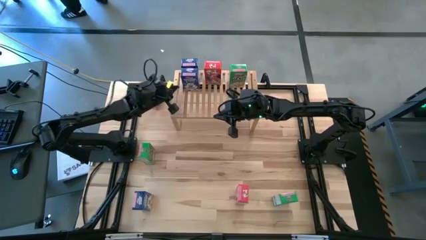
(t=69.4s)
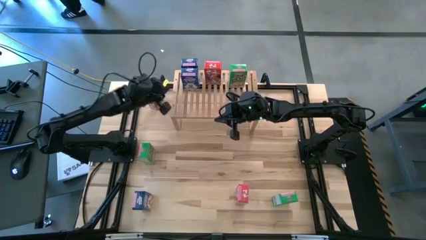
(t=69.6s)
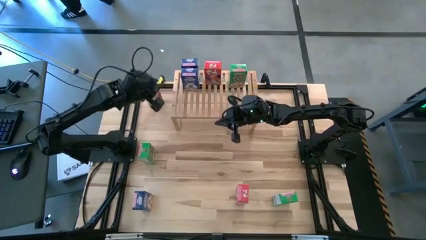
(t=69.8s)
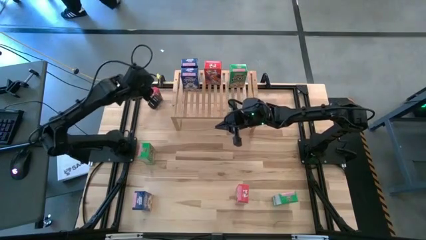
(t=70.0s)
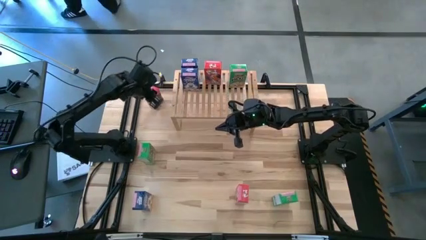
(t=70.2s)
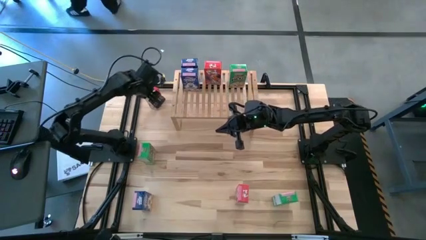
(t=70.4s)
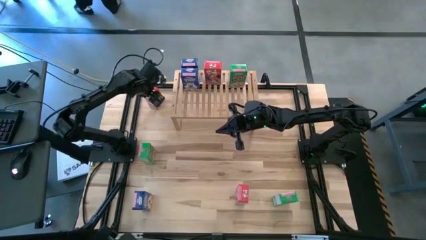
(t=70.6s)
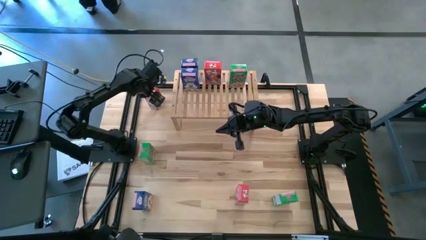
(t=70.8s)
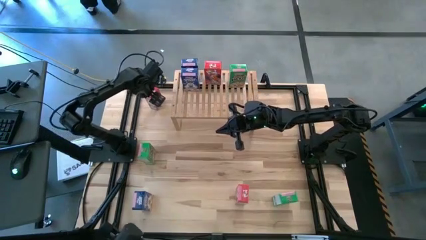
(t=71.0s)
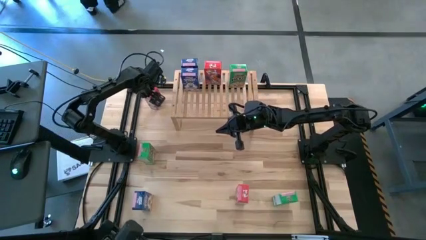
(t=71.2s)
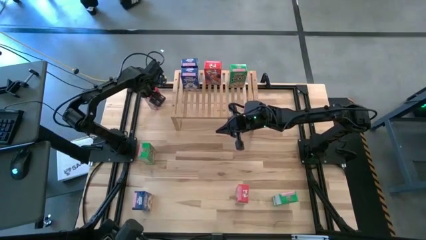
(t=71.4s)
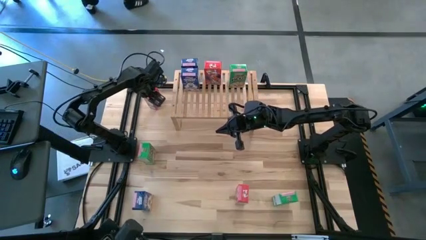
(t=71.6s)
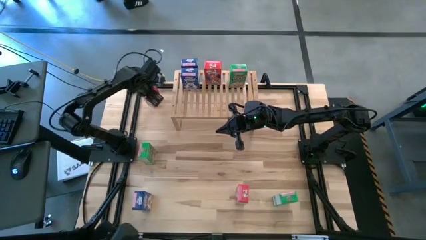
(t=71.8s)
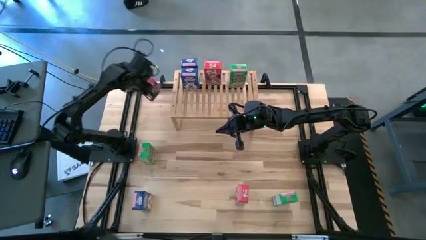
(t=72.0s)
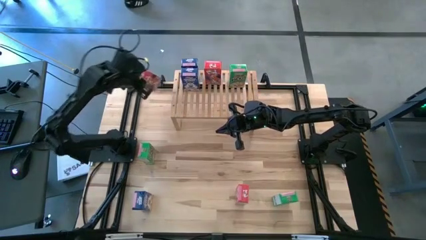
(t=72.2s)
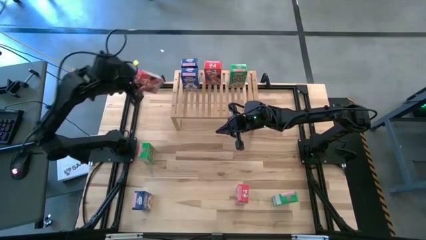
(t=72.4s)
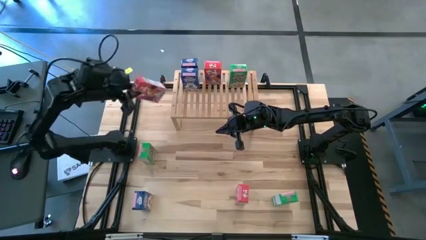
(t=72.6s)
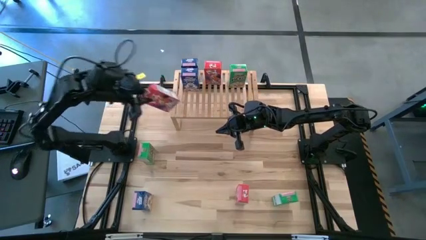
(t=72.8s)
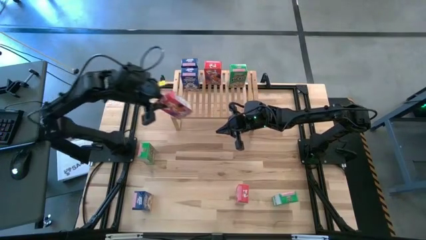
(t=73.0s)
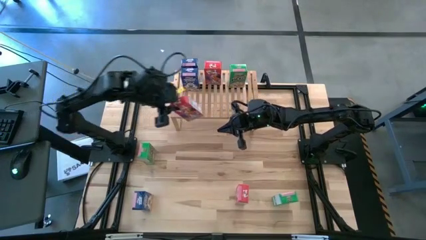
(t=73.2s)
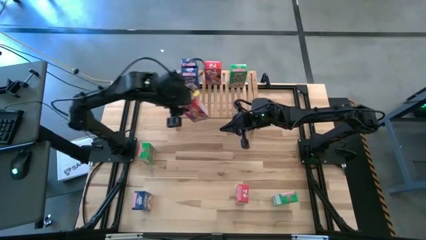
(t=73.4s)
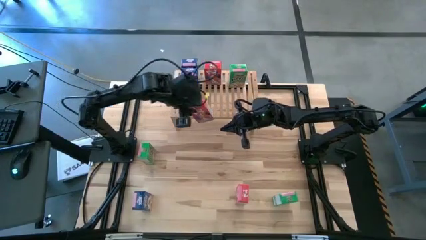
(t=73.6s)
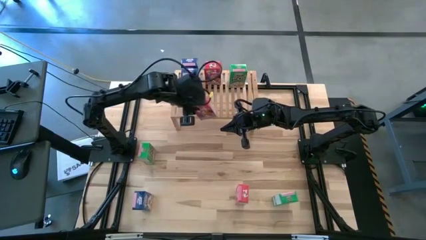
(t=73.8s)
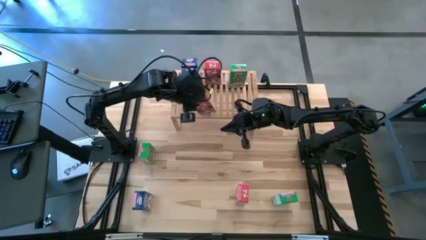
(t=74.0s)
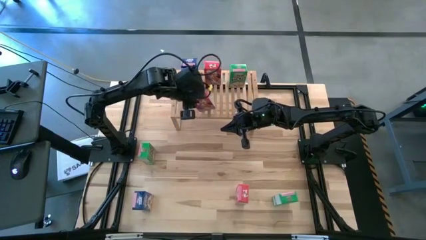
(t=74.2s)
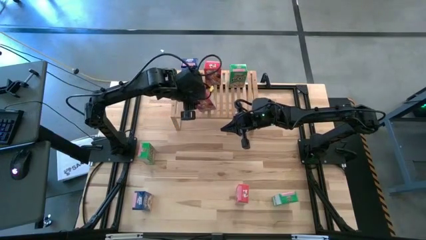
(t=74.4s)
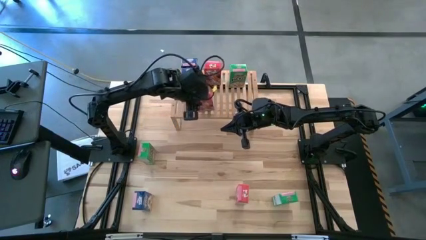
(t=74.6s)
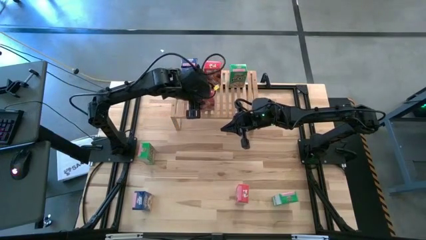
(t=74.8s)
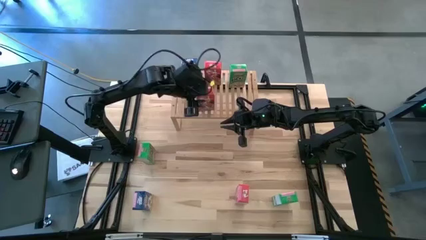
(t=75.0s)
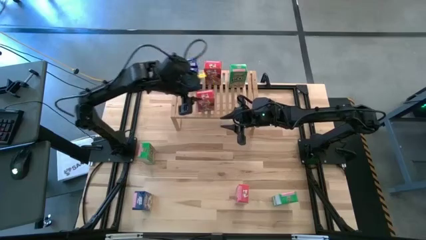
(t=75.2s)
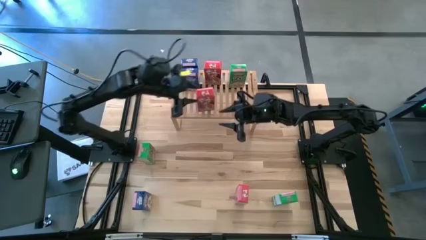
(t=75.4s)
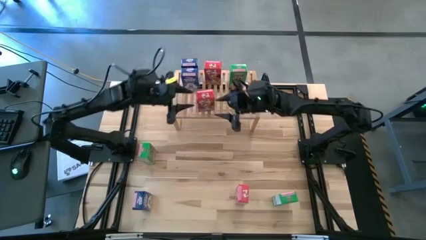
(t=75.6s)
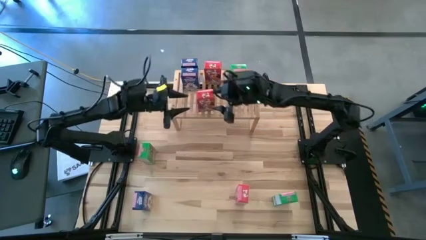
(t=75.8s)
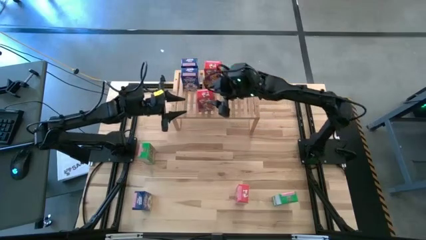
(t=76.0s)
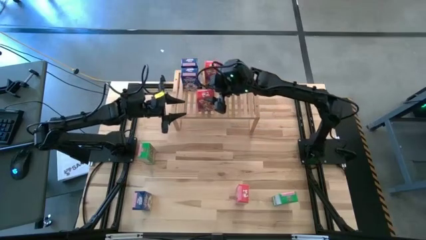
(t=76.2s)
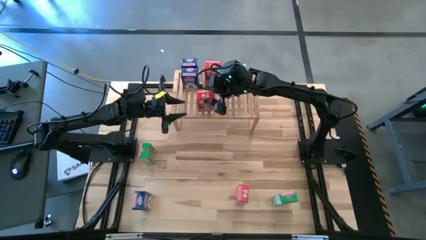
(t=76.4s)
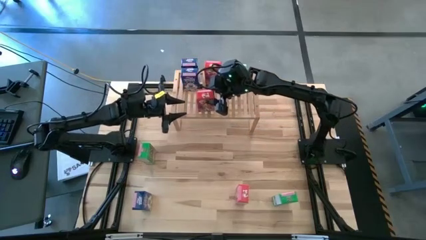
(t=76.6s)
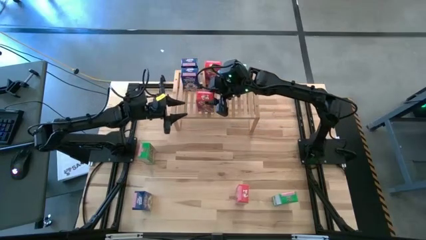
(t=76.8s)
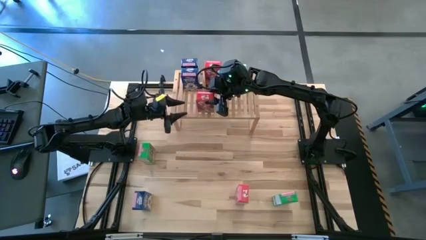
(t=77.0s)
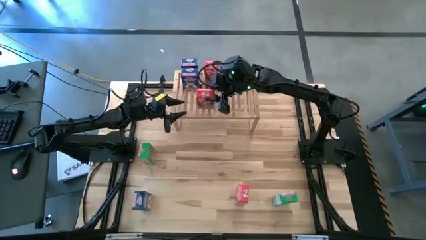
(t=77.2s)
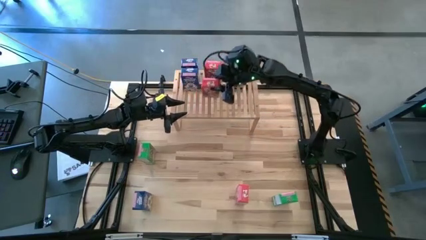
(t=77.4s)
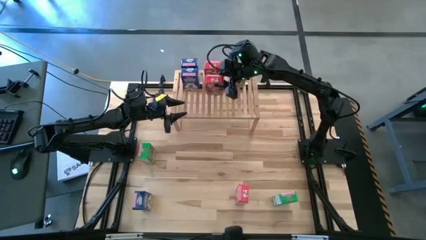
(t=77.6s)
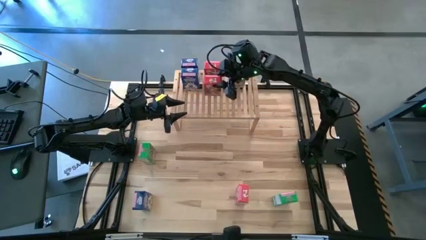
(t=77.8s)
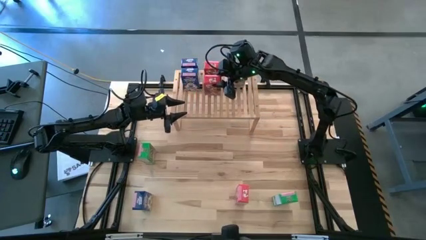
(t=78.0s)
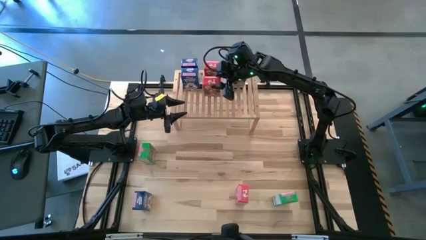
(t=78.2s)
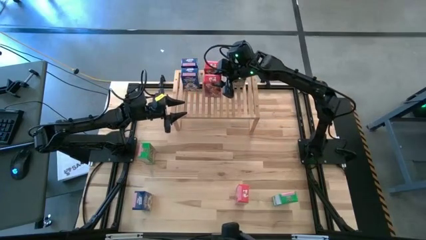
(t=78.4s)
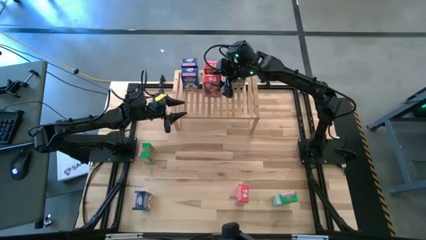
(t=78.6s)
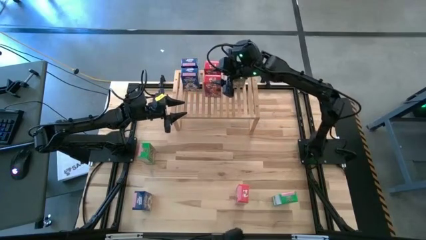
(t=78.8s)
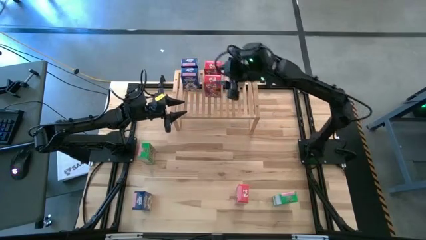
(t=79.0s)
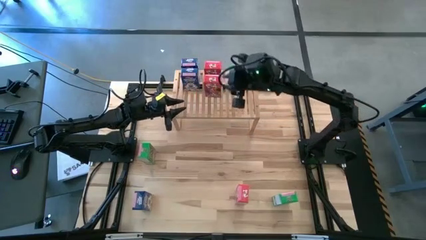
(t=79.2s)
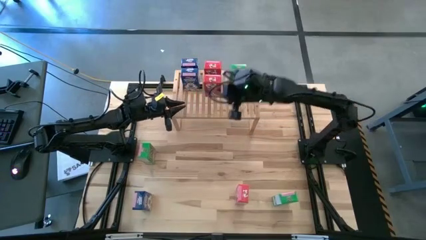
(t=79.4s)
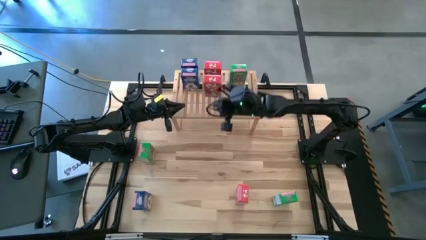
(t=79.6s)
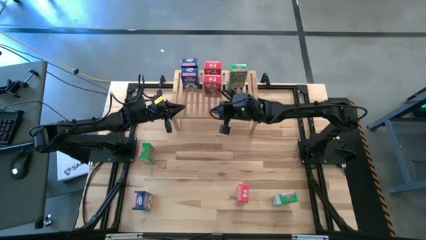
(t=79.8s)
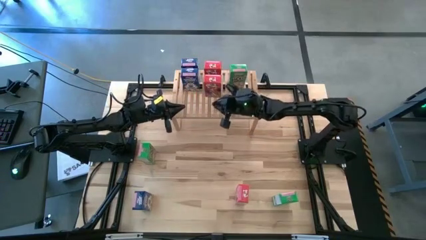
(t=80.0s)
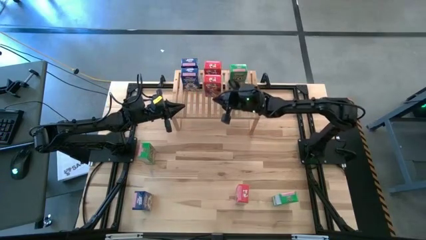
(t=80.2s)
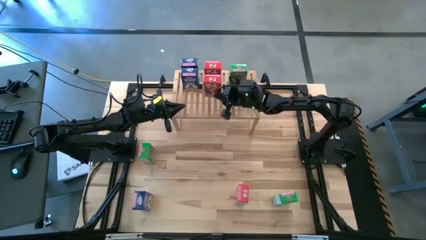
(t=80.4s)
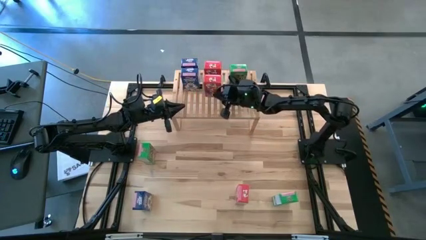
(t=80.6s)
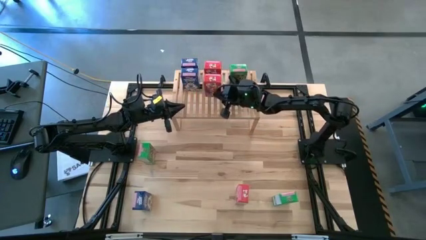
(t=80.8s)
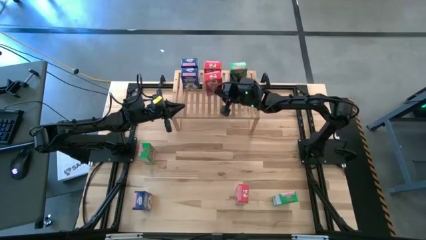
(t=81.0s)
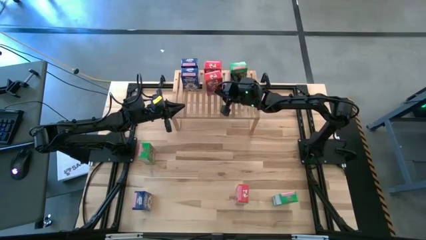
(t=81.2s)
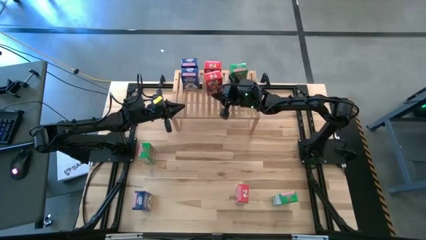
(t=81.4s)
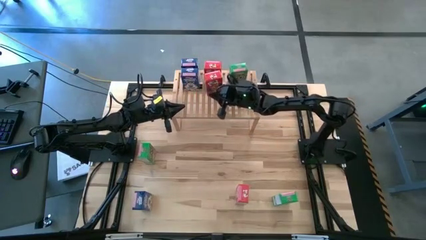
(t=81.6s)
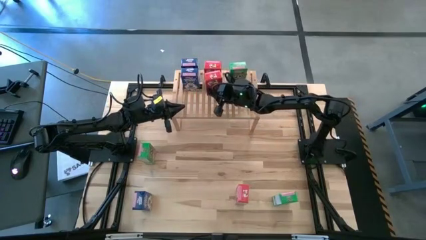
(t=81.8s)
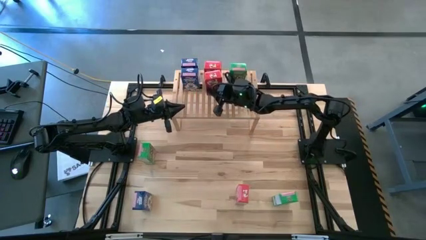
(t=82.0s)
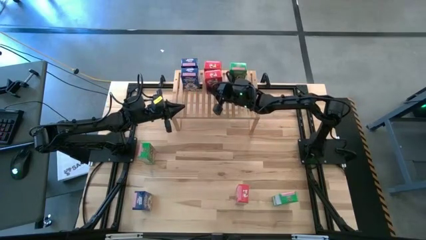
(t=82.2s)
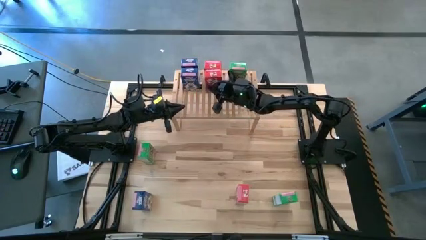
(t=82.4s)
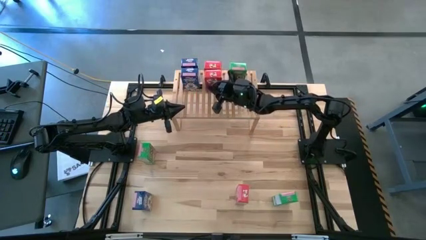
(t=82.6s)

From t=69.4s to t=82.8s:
Task: Stack cereal on shelf
Put the top red cereal box on the shelf and align it with the other red cereal box
